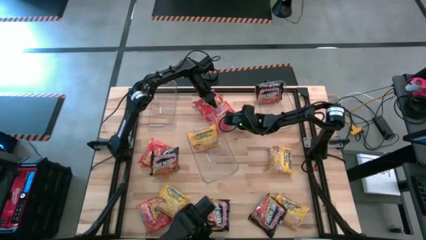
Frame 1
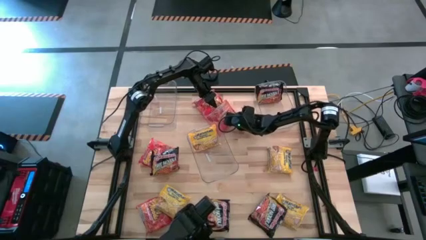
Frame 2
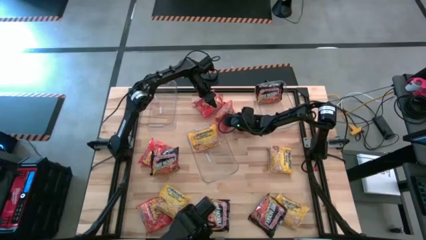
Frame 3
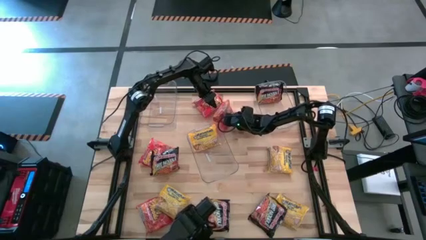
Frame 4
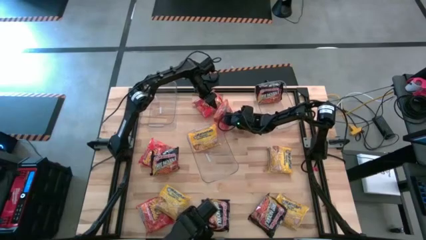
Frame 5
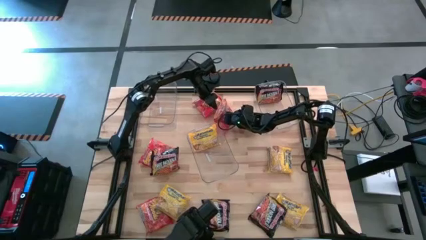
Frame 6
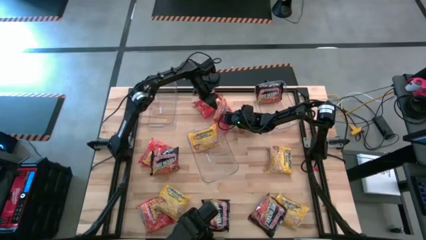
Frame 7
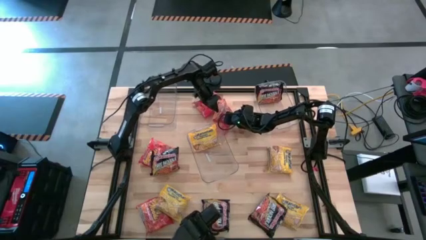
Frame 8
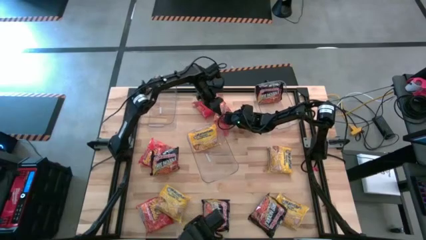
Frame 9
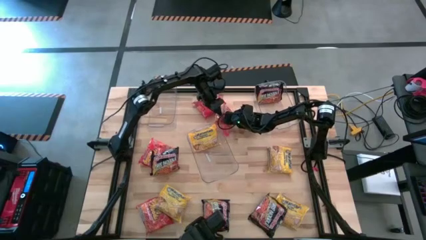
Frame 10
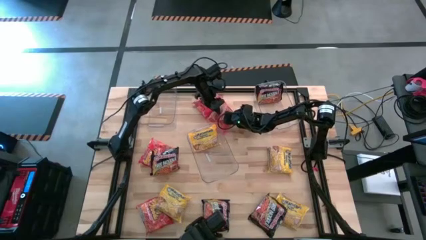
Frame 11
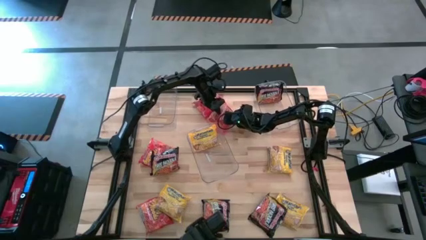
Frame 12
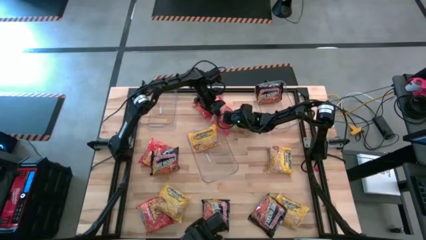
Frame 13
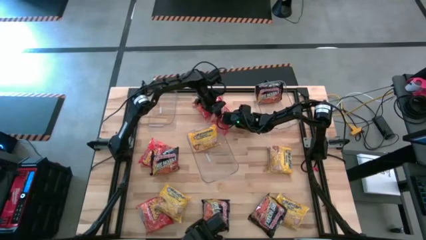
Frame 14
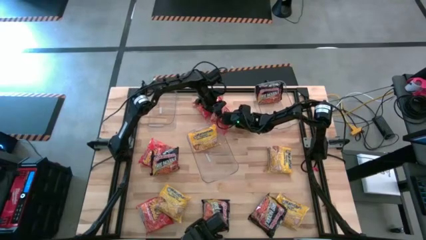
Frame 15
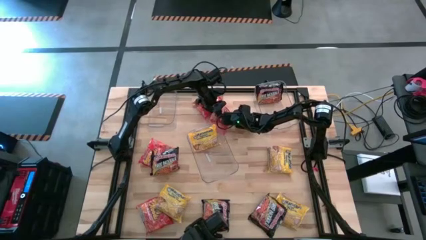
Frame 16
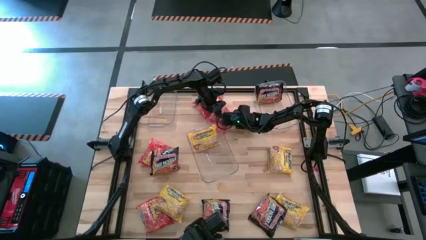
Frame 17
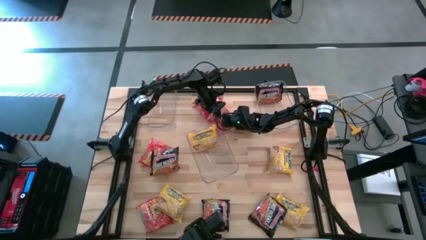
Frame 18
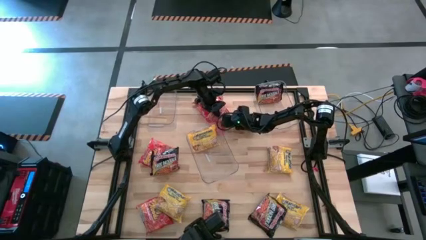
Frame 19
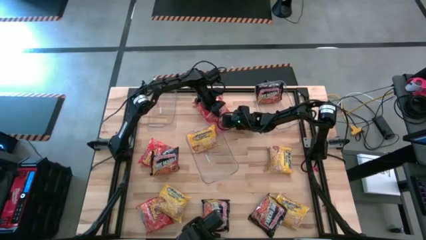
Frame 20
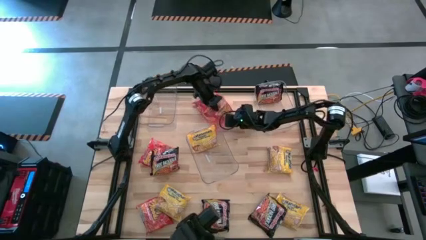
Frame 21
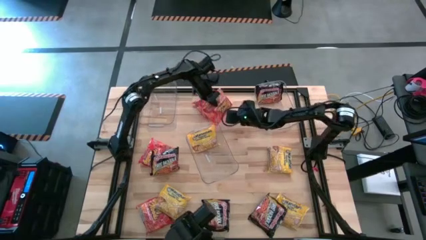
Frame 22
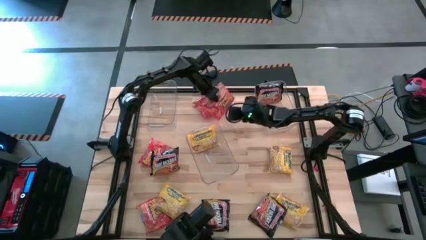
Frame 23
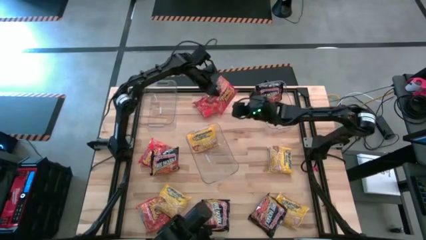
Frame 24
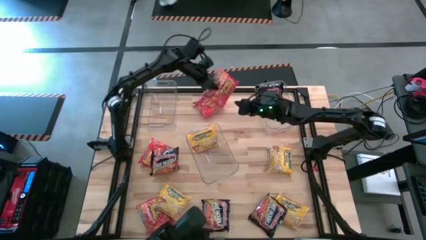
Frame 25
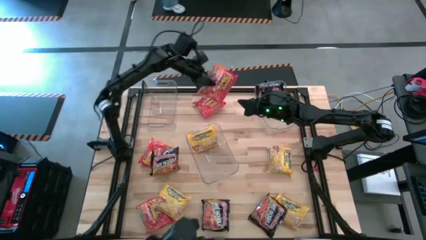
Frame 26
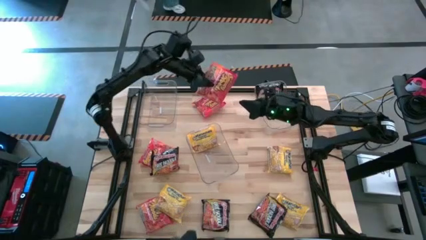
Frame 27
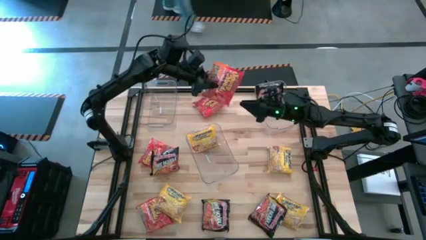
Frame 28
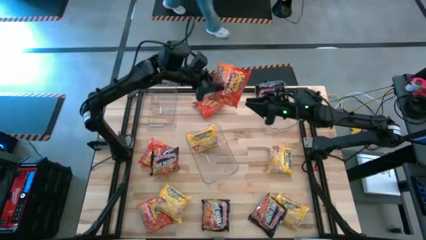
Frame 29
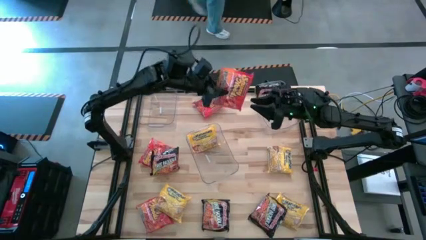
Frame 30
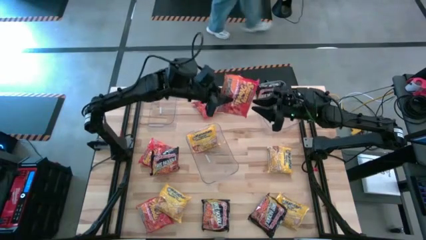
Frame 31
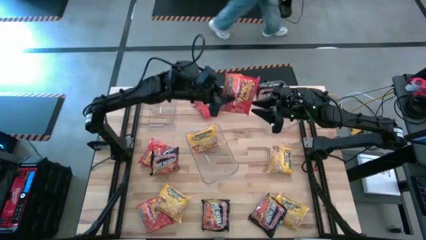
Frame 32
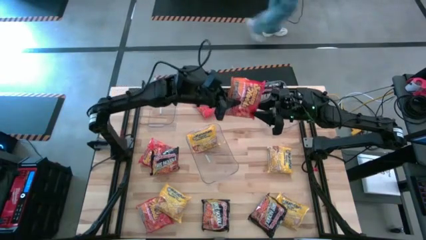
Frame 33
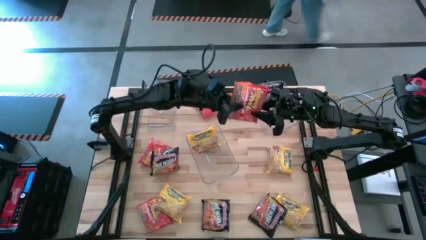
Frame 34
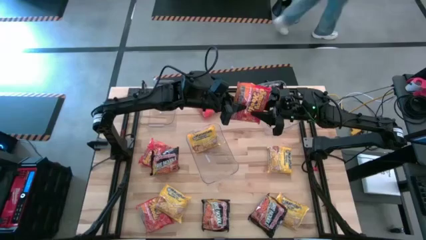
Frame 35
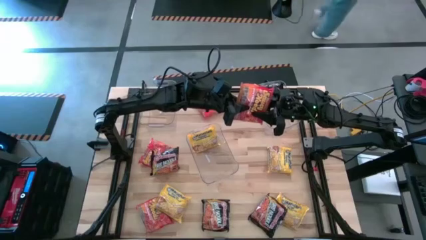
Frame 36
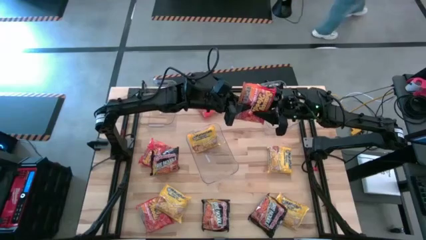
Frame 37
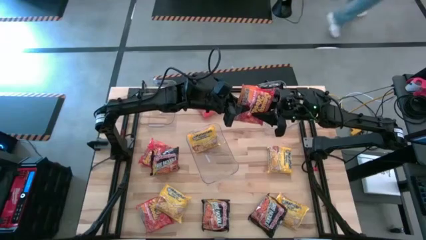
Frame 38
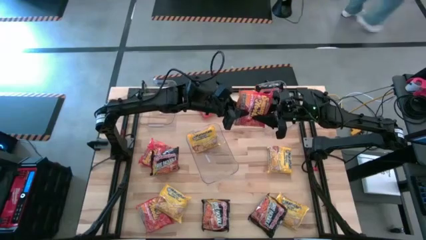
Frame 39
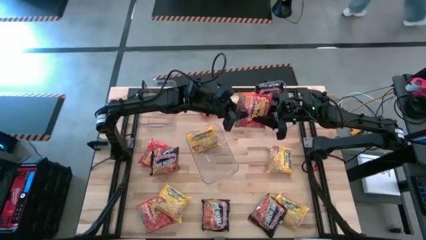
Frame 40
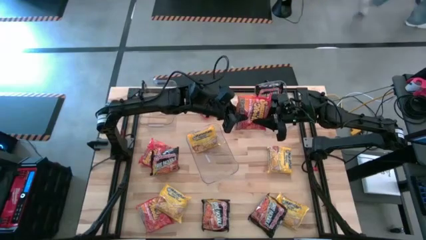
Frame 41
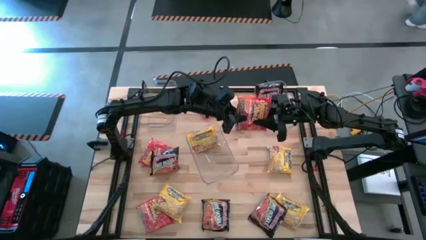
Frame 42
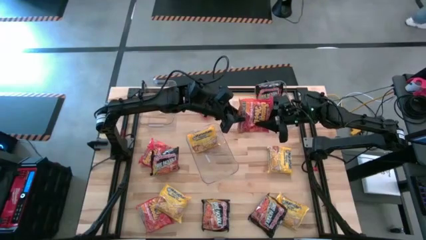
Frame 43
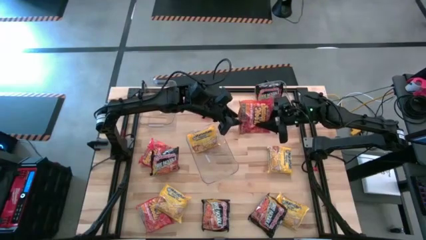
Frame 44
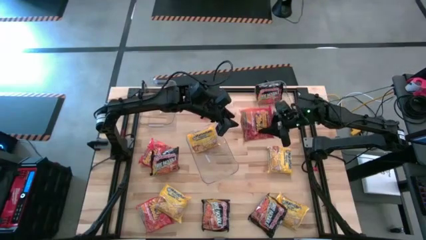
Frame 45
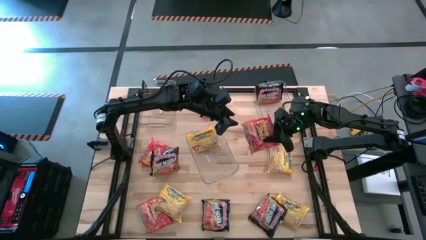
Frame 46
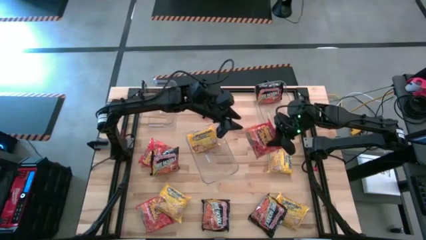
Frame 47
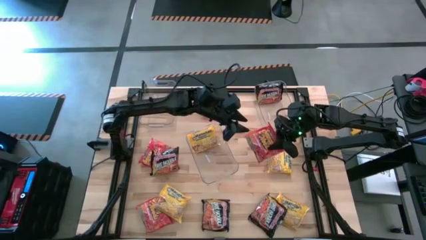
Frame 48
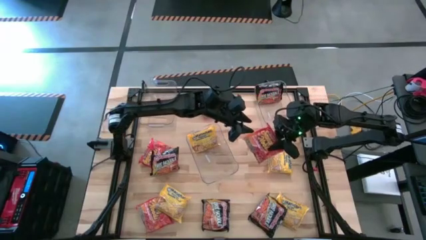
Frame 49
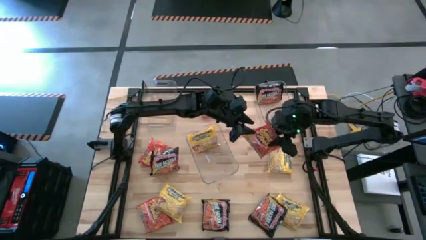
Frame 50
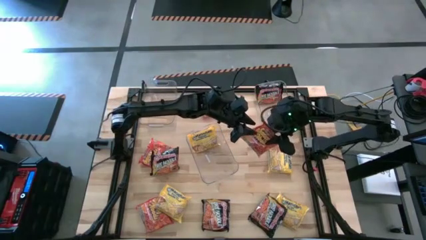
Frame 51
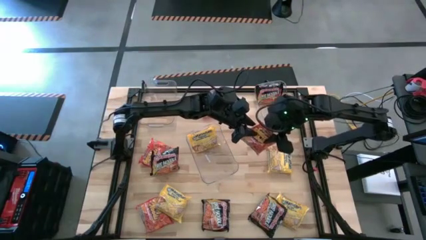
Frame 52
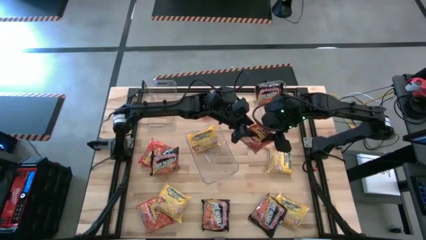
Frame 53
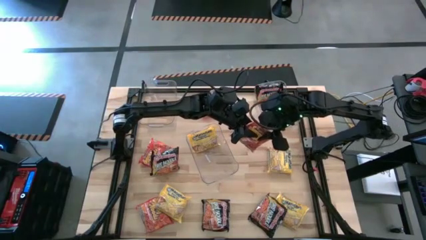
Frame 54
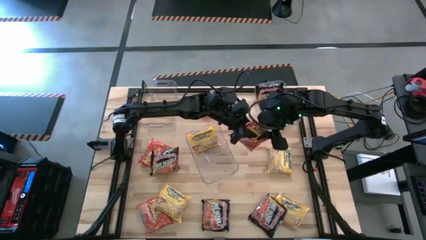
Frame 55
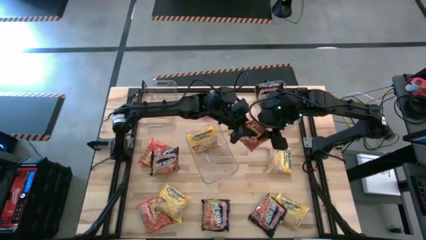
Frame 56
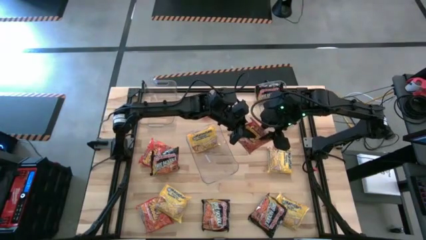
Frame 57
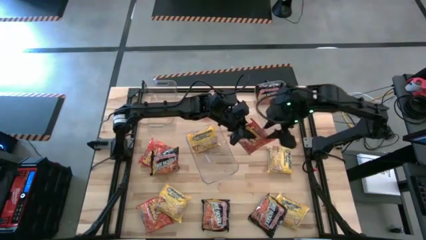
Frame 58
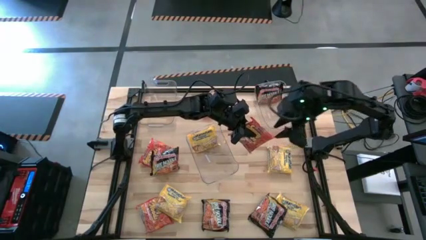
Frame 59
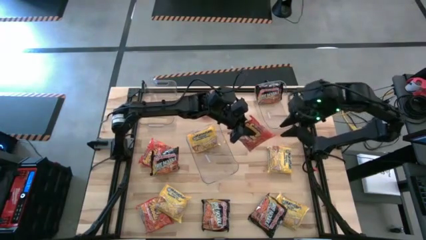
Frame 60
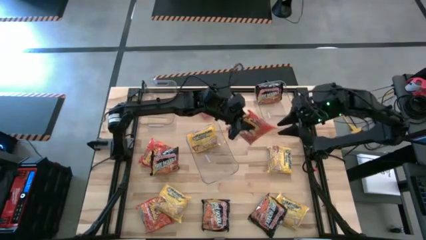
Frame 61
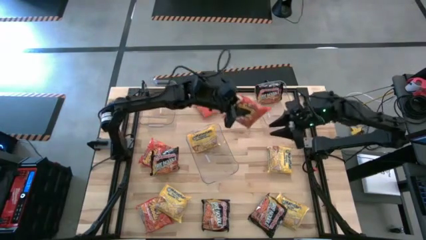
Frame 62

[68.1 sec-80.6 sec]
Task: Sort Maruchan noodles
Put the orange noodle pack into the top left transparent bin

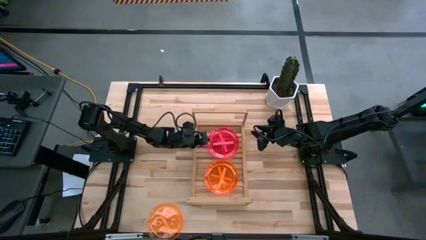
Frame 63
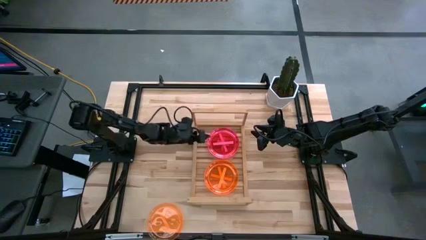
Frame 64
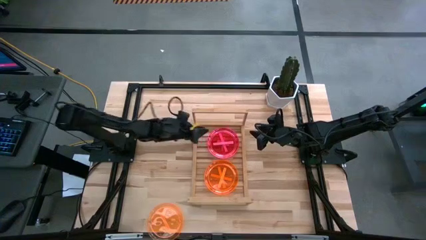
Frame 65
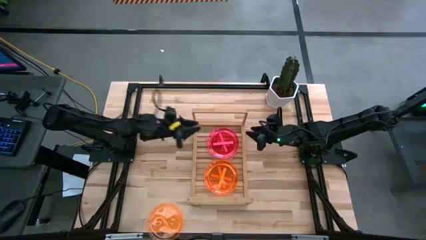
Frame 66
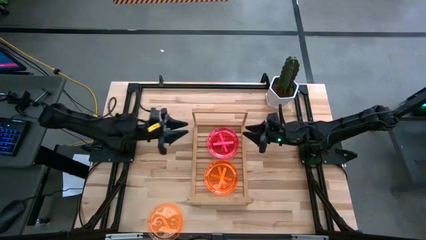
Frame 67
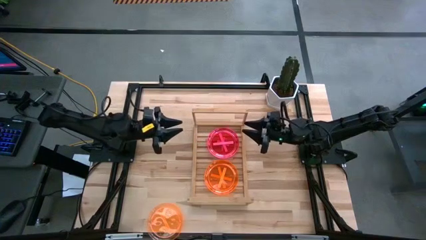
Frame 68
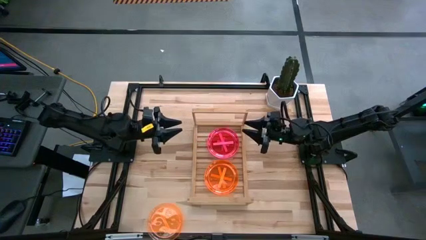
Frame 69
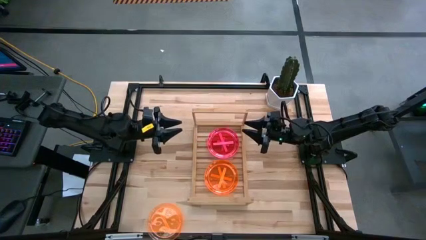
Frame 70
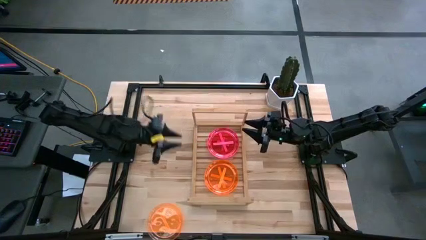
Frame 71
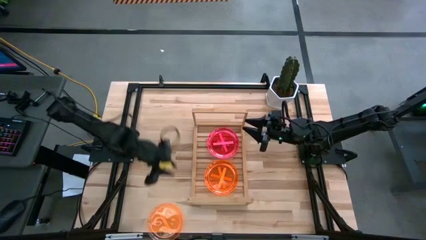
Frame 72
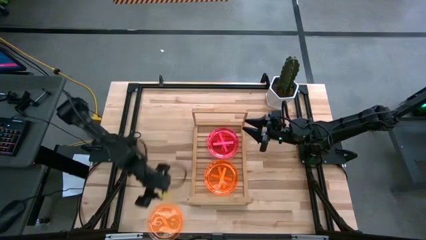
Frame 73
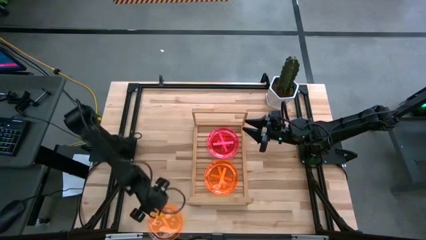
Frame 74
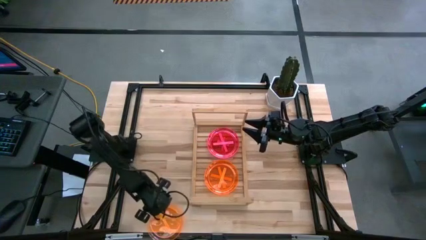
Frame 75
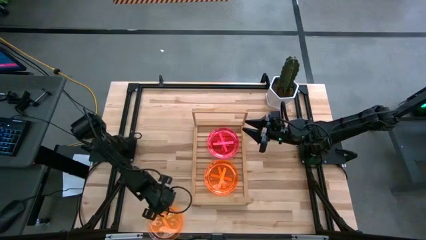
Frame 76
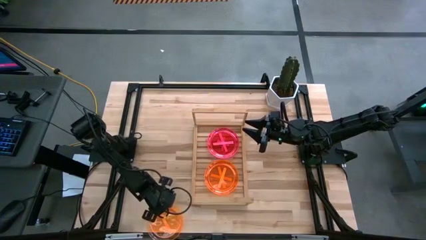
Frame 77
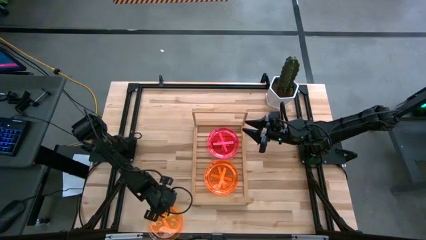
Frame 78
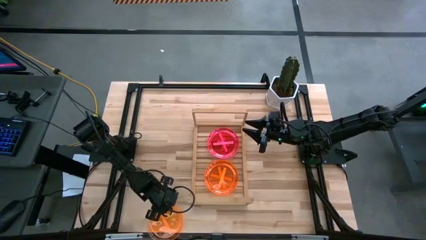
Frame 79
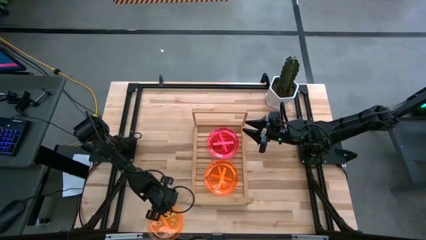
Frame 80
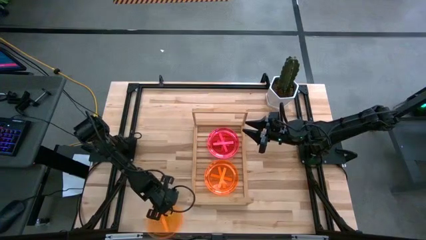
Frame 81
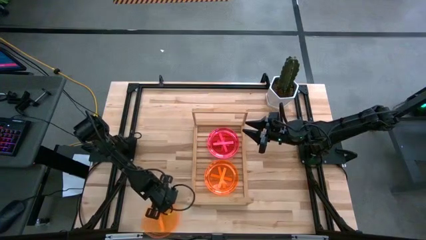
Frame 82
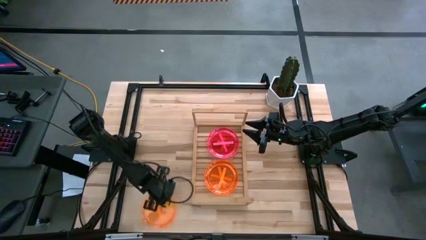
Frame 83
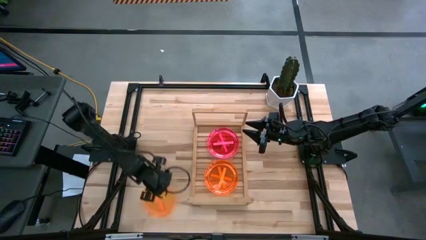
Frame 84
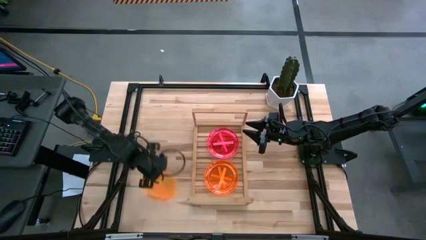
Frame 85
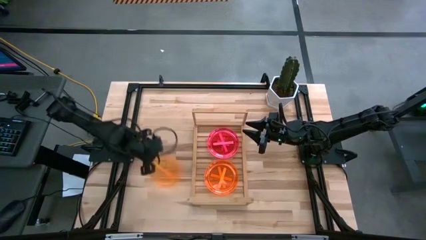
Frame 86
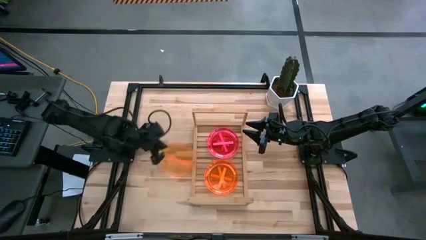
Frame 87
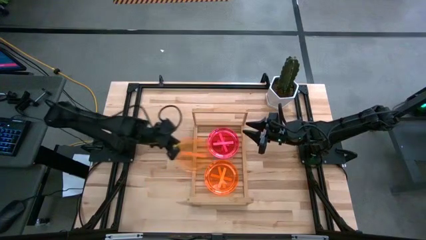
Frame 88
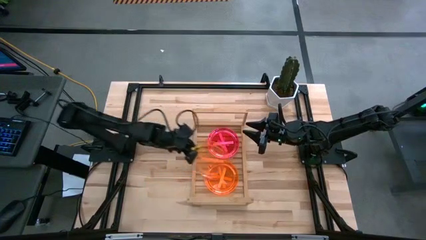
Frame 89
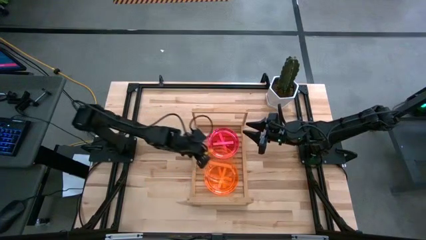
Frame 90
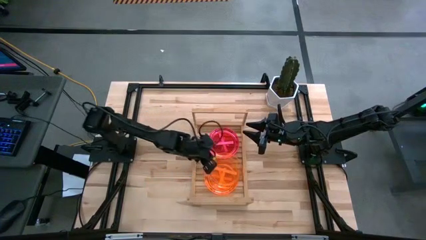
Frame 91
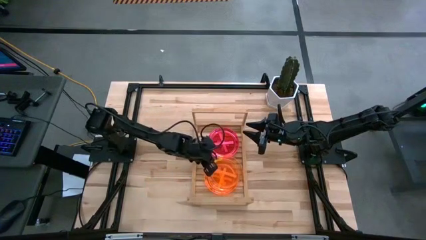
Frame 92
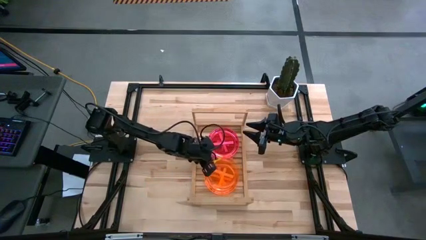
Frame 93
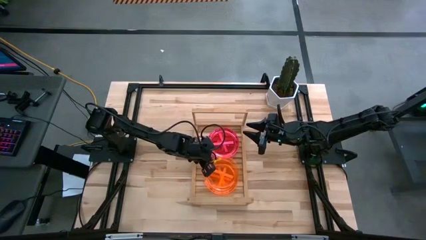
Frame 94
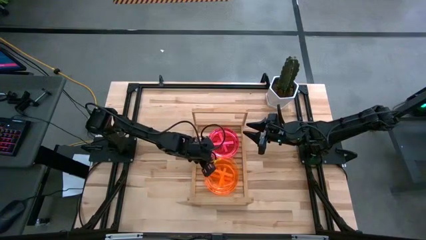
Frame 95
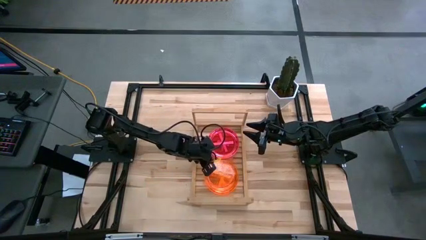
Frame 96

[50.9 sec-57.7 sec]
Task: Place and stack plates onto a shelf
Stack the orange plate on top of the orange plate on the shelf
